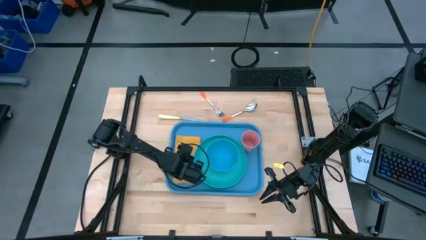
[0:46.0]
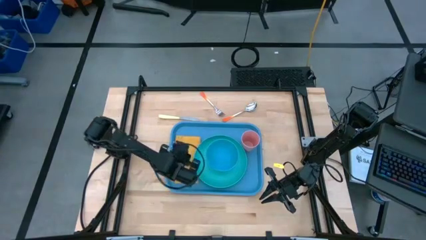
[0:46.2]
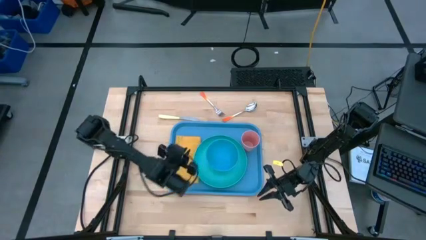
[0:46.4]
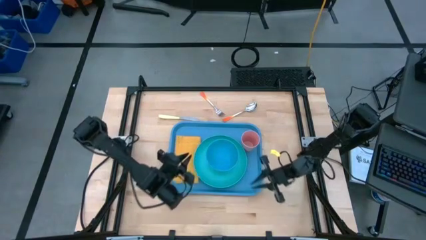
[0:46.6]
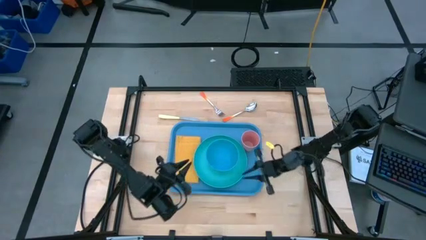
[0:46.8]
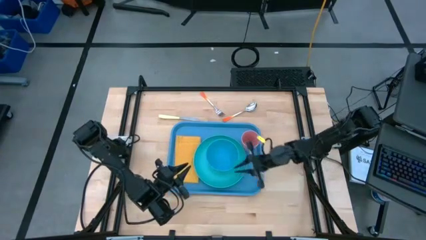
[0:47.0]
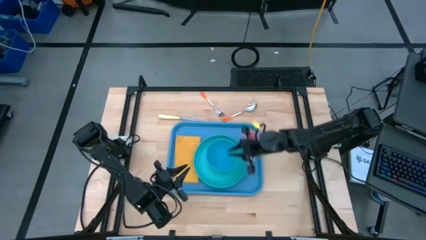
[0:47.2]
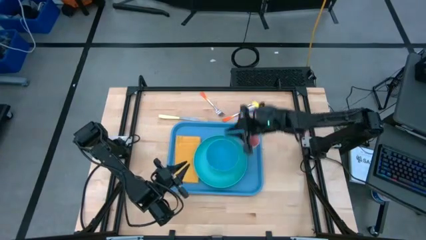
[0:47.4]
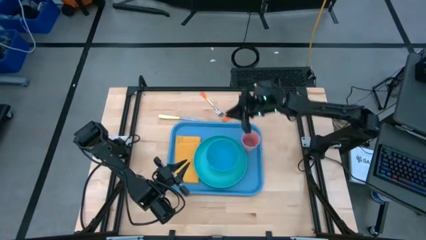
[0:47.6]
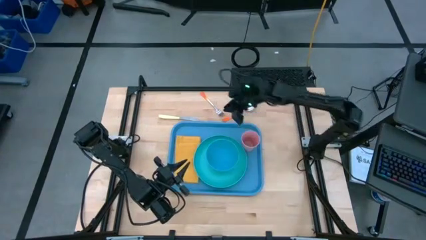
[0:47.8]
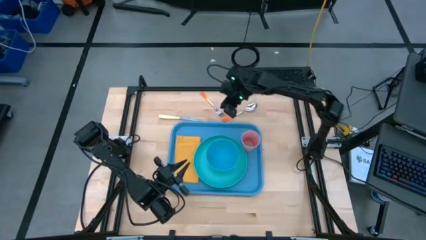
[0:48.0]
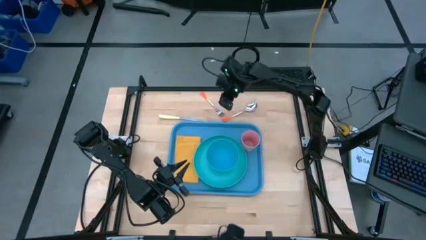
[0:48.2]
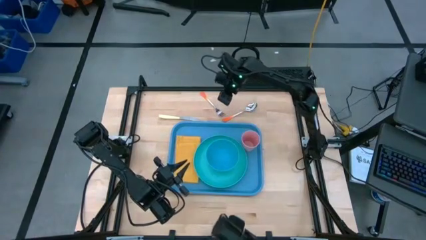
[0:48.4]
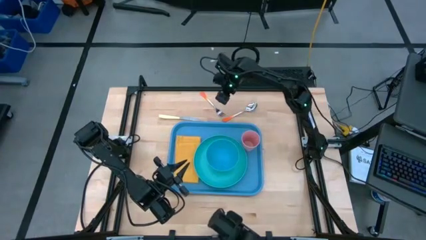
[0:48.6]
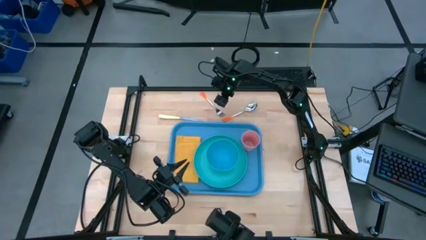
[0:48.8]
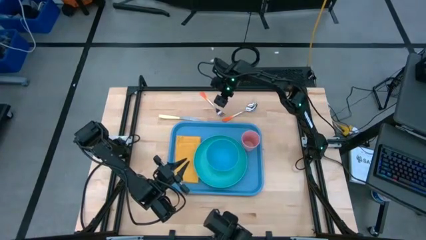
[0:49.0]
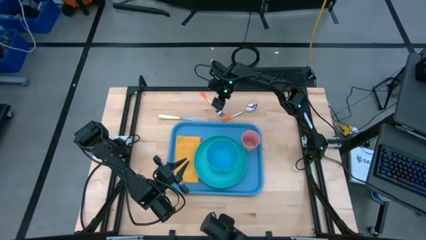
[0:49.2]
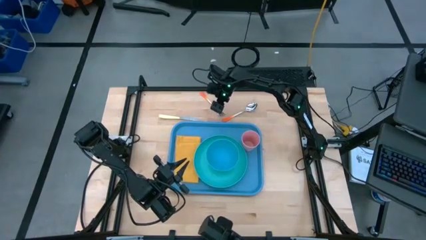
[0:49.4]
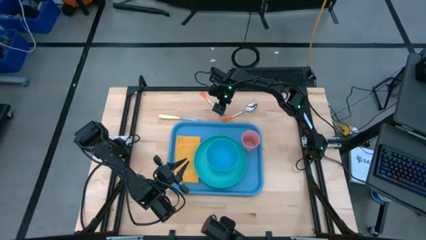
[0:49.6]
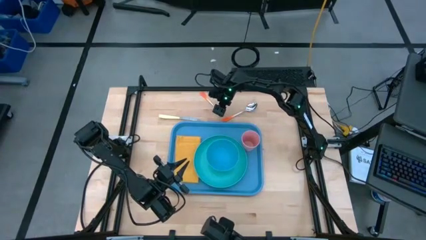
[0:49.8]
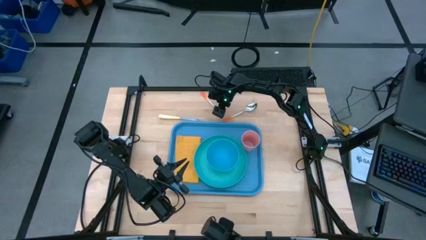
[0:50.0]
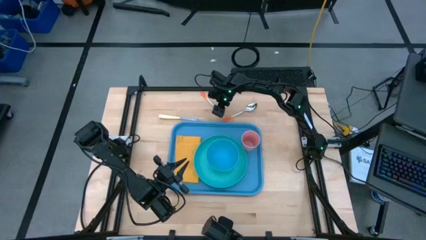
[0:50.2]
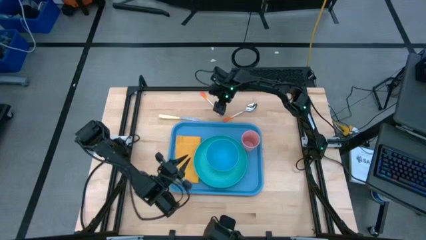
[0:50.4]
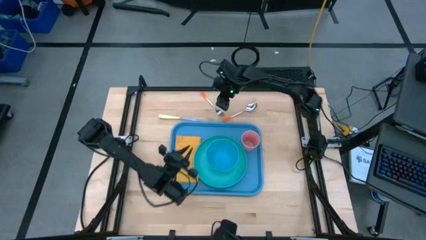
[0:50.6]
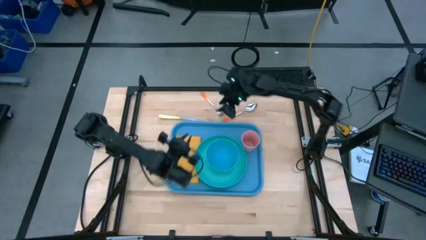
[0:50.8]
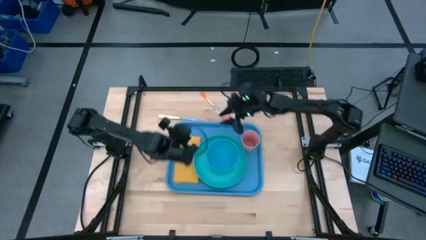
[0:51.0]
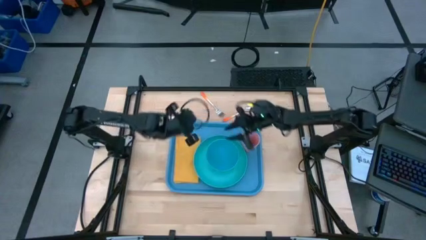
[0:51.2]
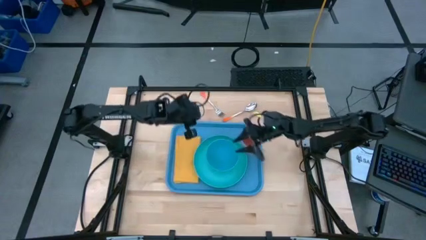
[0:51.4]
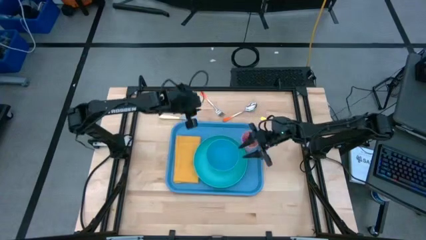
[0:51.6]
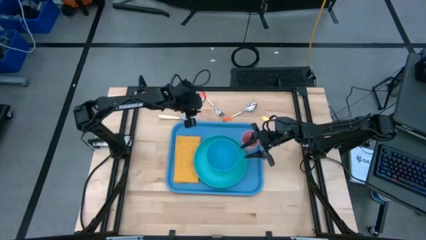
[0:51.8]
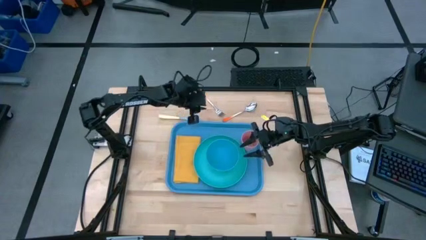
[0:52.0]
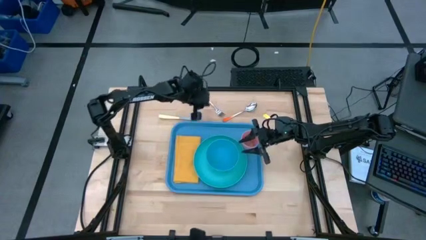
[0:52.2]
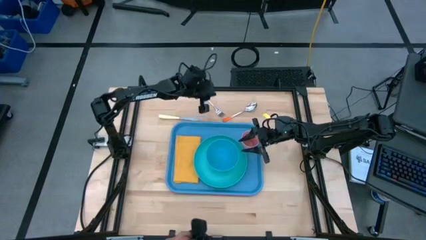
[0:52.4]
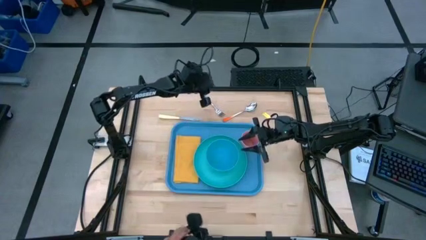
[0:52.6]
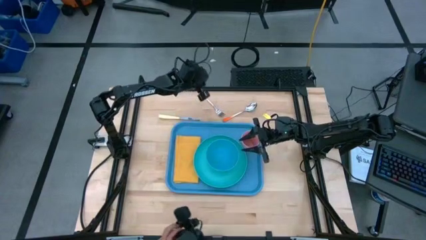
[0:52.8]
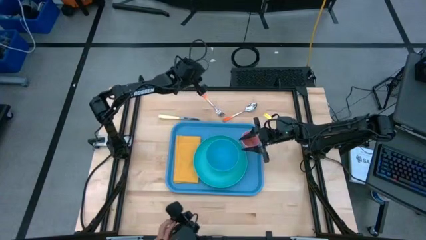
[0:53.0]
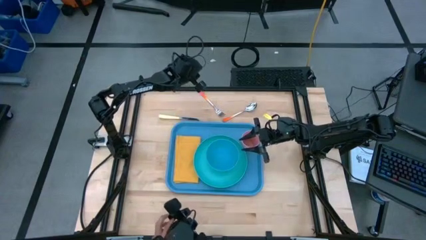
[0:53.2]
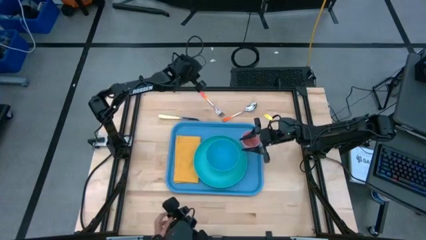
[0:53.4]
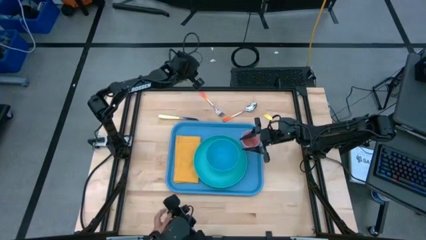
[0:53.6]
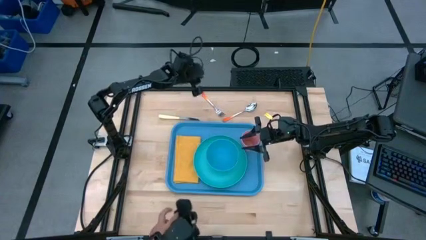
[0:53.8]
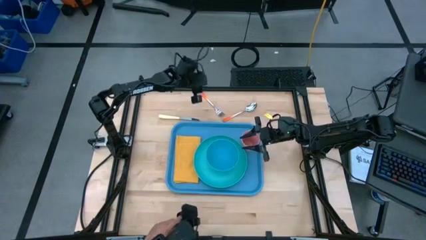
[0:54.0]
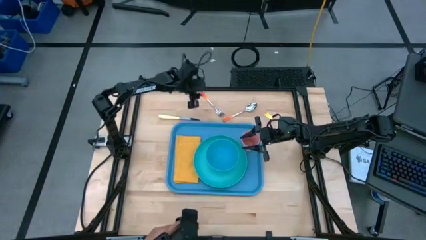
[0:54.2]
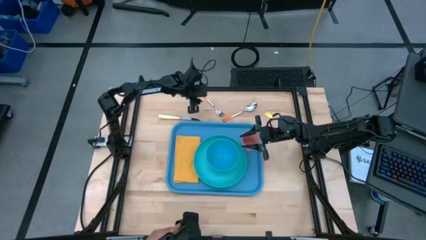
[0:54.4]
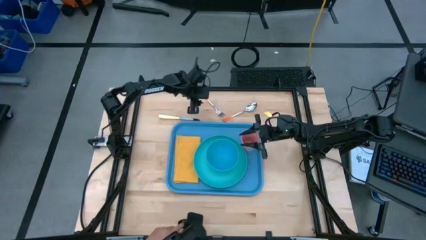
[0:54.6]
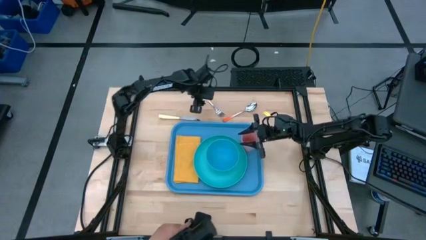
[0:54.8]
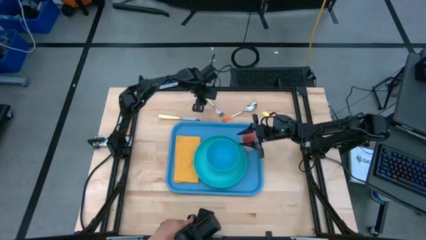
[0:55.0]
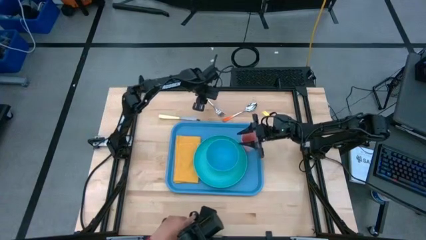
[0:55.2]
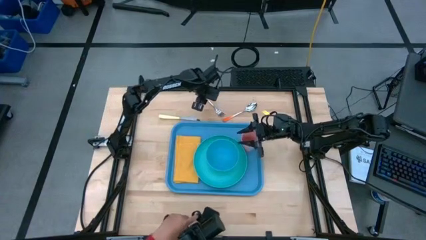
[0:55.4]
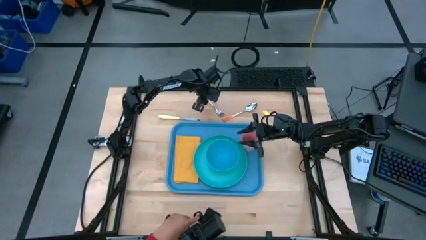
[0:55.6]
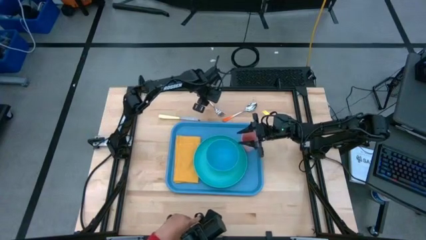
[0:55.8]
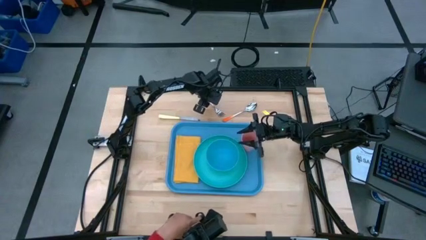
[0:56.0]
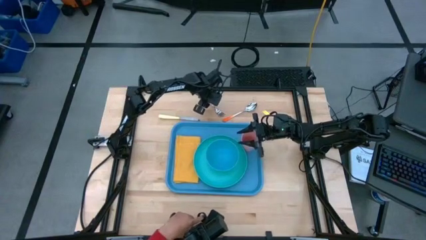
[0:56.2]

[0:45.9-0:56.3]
Task: Set up tray
Put the orange fork on the yellow napkin

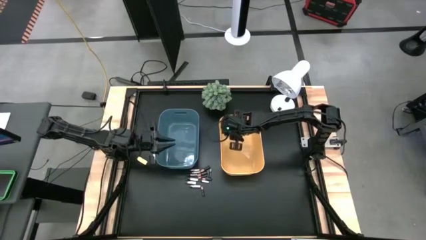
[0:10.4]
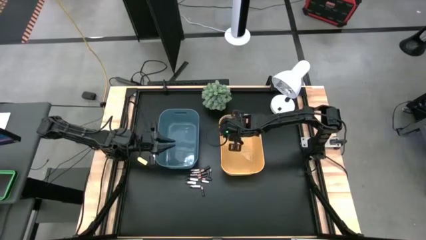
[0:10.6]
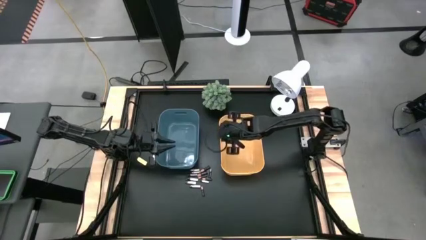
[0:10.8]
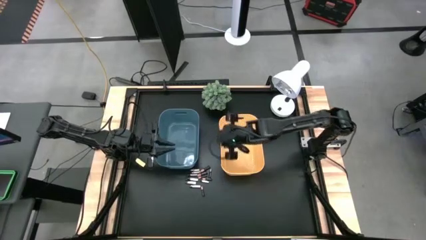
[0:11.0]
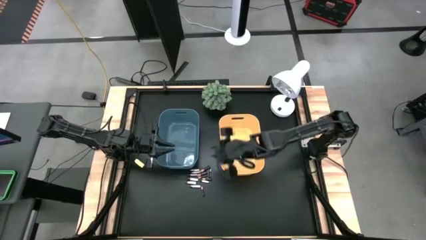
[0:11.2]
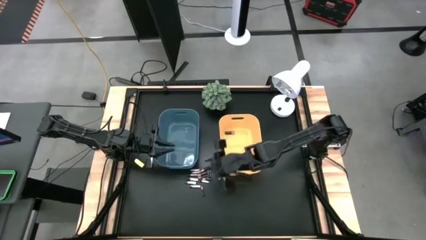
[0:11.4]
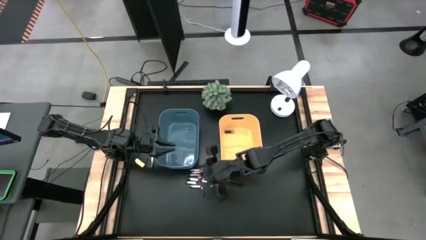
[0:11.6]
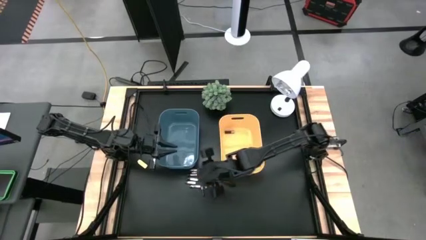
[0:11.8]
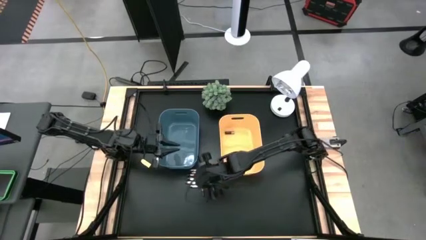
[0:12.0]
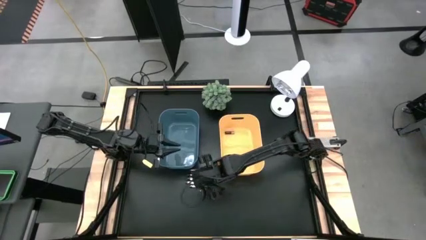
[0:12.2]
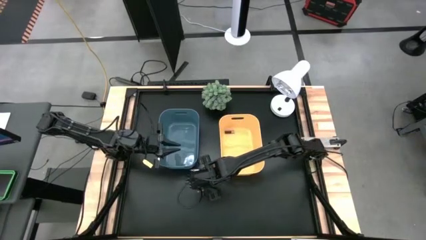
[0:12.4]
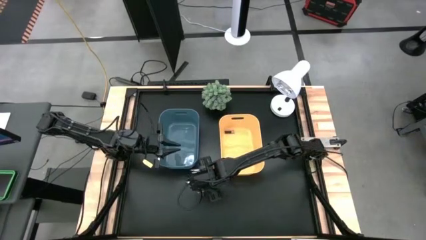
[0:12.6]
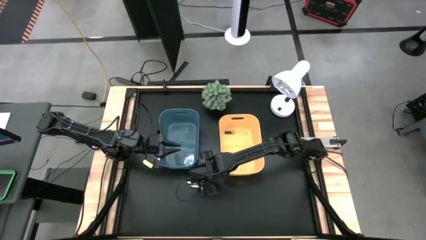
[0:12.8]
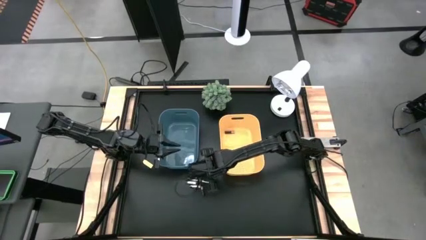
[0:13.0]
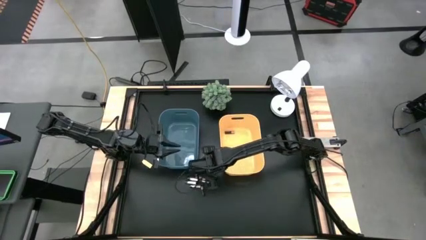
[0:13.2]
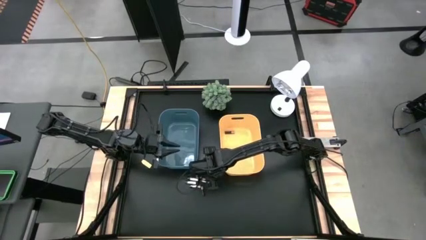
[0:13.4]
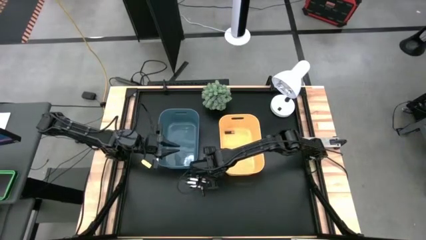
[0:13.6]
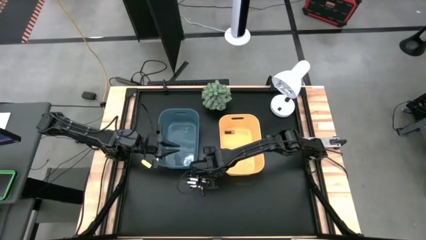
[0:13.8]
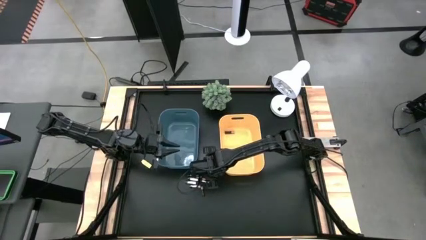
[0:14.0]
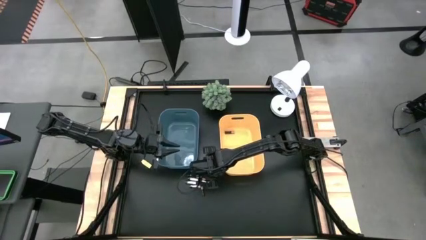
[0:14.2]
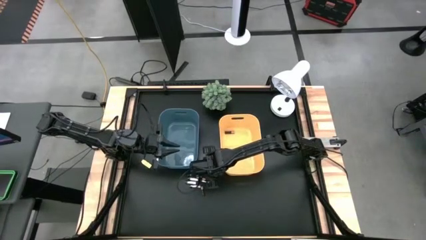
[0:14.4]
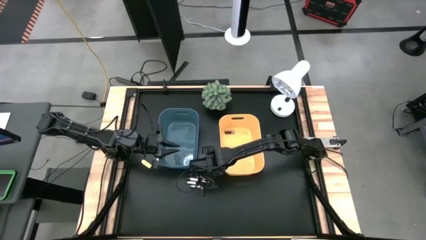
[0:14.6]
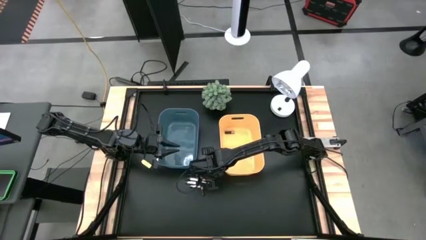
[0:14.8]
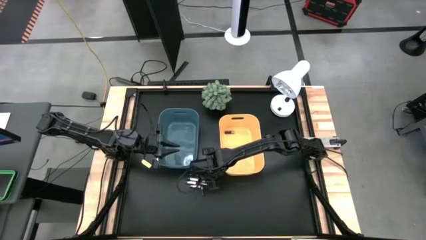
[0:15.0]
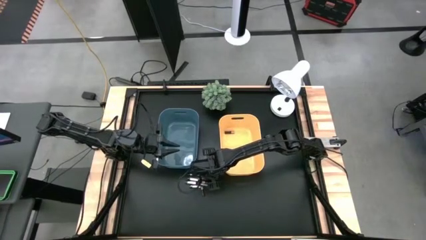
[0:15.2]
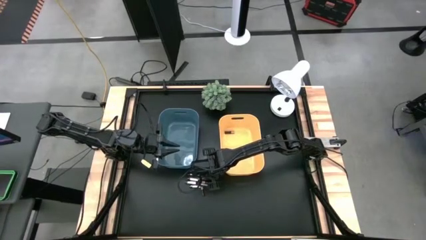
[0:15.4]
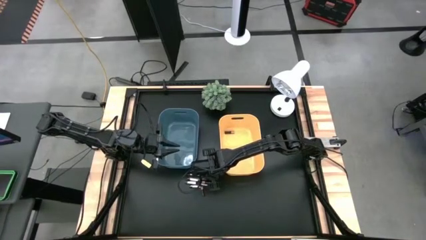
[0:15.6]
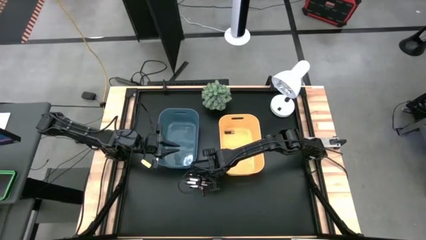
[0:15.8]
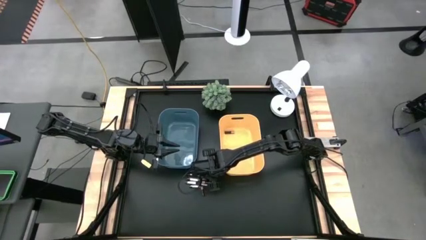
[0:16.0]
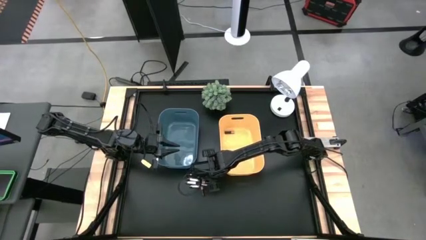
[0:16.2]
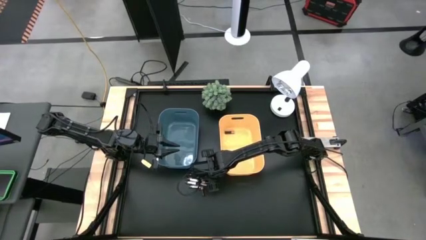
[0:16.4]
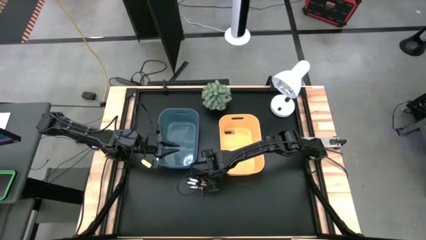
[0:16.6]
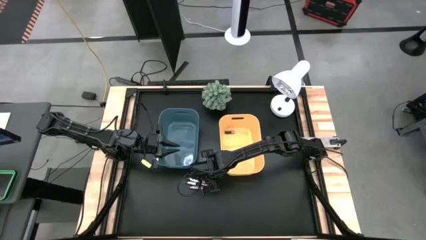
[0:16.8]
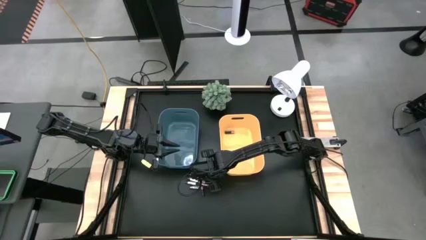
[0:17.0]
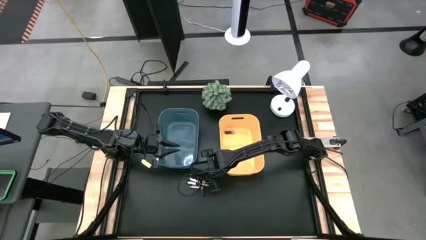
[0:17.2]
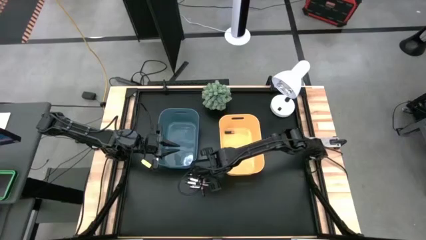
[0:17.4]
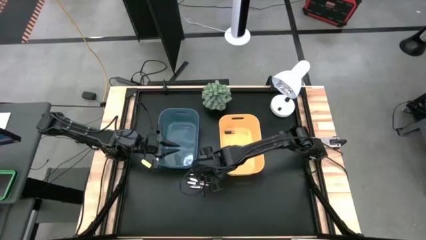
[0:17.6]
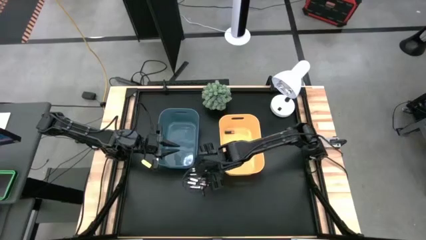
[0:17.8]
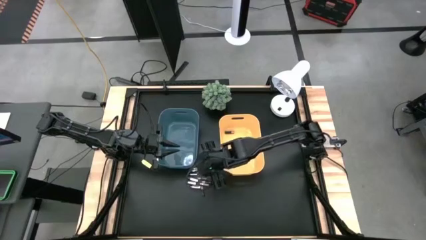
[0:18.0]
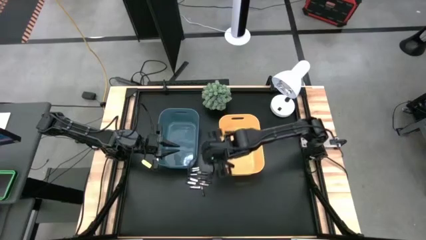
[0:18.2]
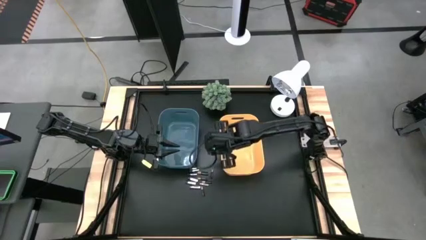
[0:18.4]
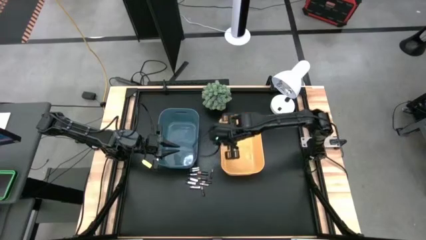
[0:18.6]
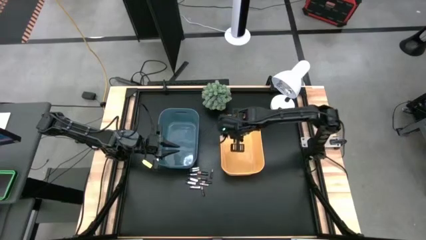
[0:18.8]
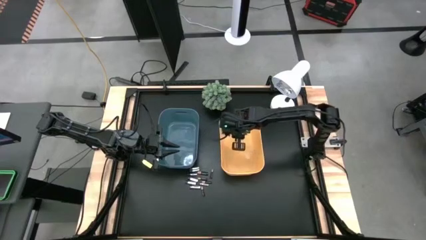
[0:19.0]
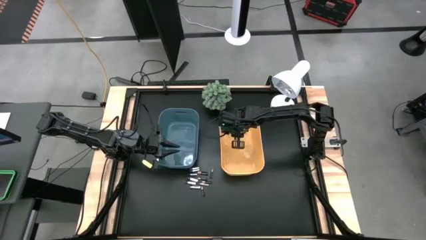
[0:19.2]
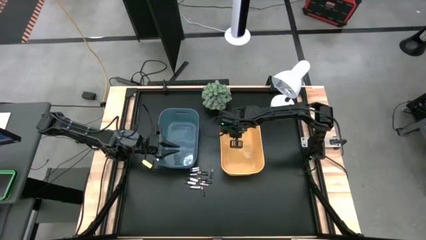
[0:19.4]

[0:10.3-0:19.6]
Task: Sort batteries
Put the black battery into the yellow bin
